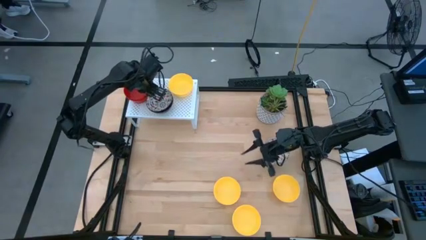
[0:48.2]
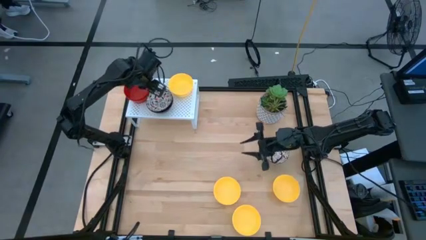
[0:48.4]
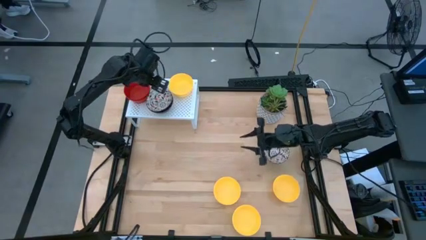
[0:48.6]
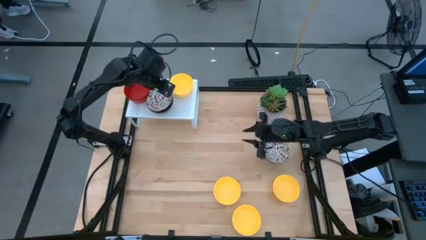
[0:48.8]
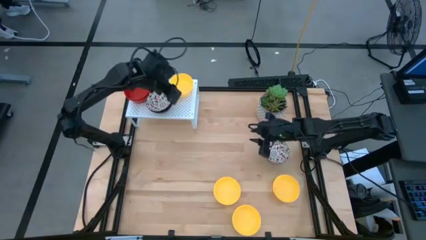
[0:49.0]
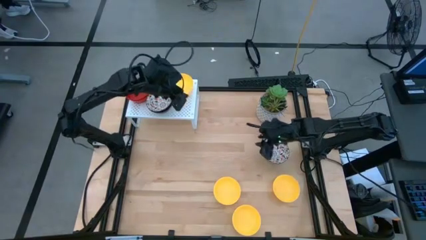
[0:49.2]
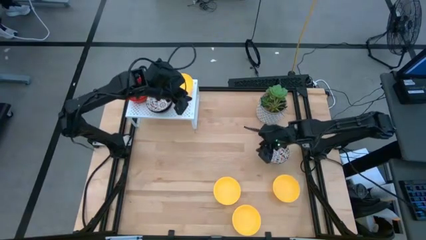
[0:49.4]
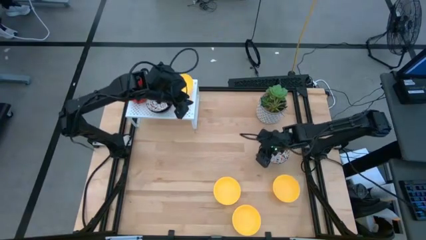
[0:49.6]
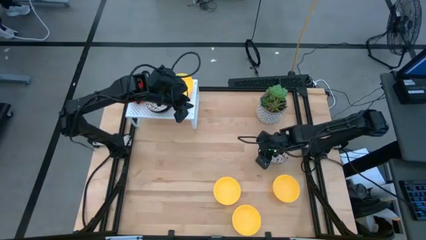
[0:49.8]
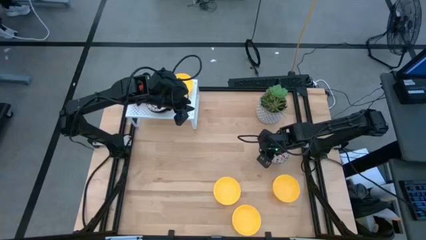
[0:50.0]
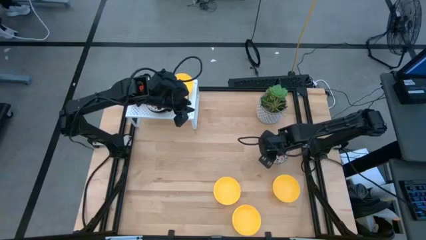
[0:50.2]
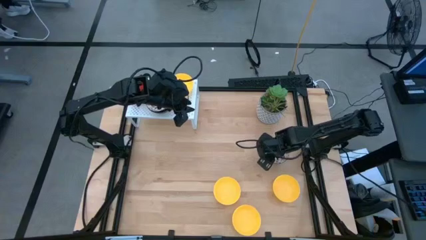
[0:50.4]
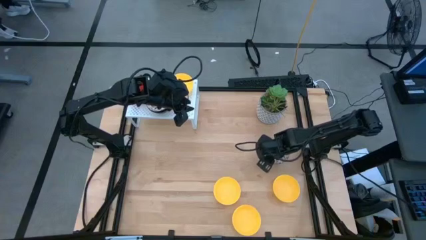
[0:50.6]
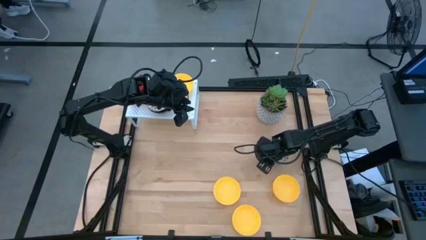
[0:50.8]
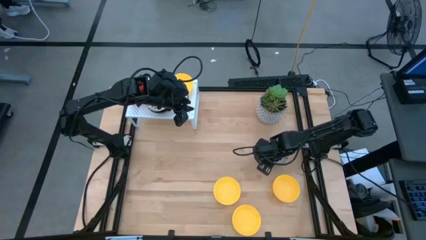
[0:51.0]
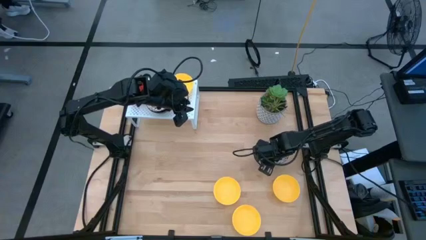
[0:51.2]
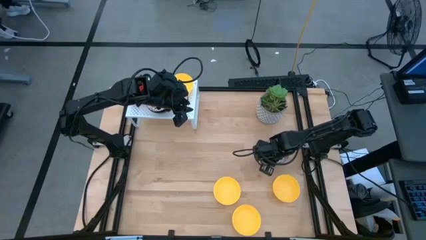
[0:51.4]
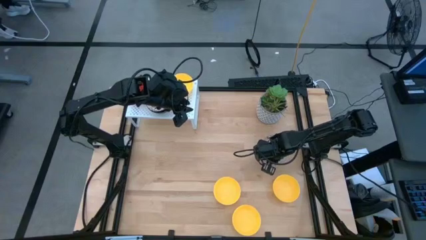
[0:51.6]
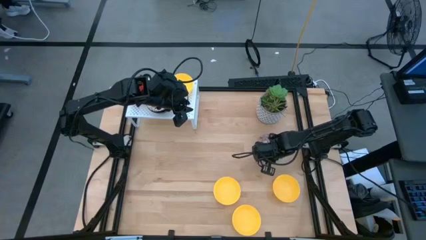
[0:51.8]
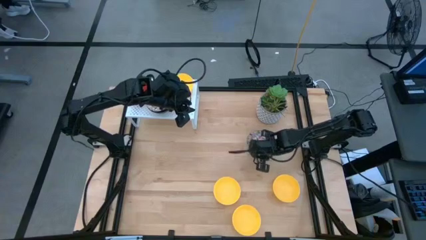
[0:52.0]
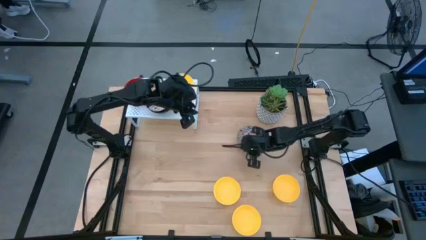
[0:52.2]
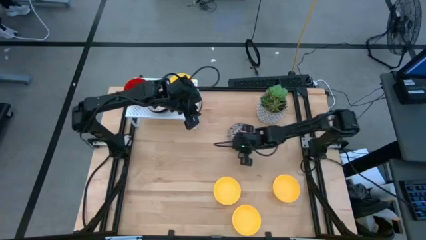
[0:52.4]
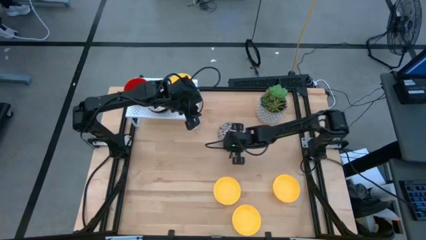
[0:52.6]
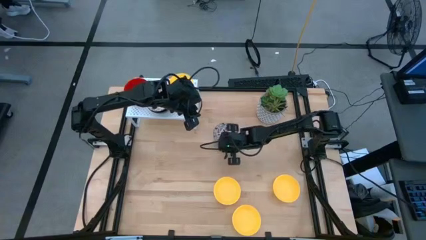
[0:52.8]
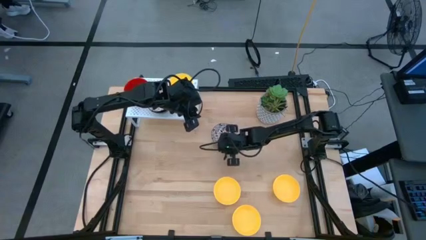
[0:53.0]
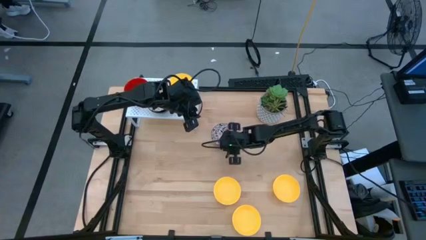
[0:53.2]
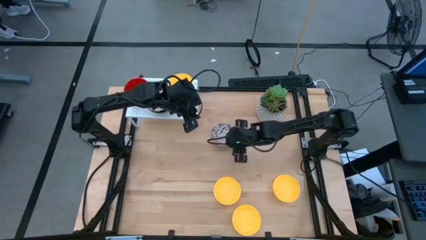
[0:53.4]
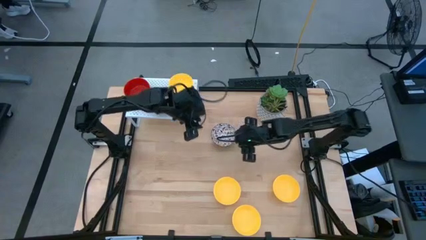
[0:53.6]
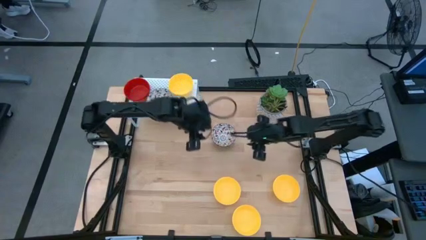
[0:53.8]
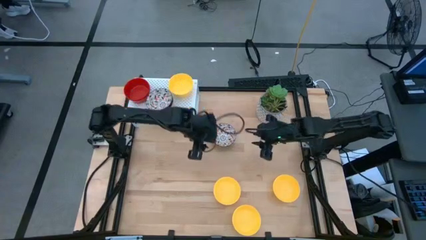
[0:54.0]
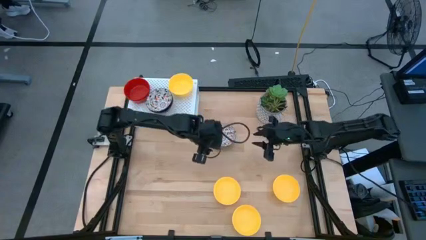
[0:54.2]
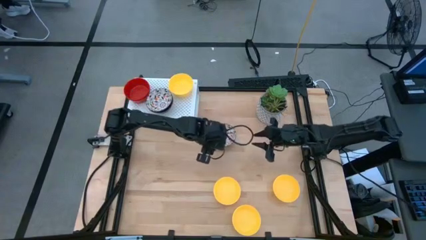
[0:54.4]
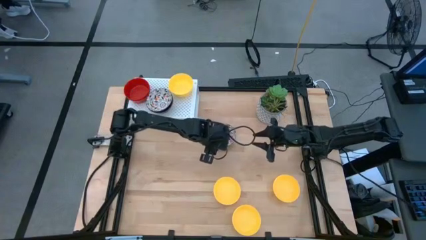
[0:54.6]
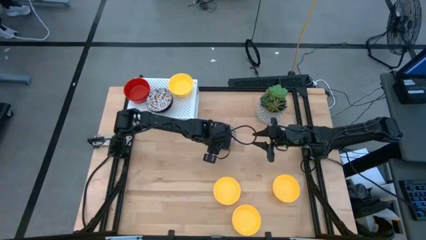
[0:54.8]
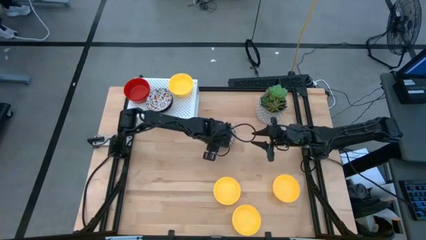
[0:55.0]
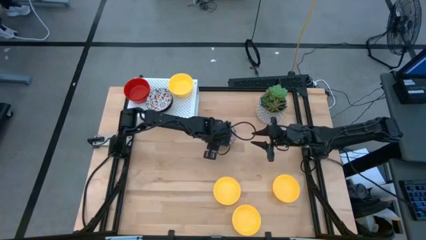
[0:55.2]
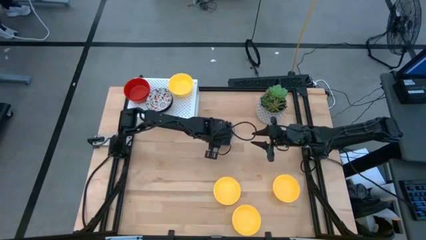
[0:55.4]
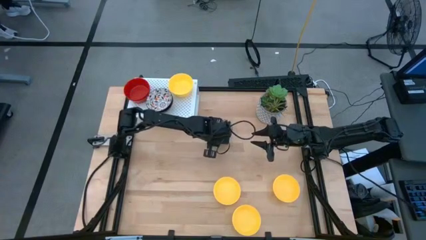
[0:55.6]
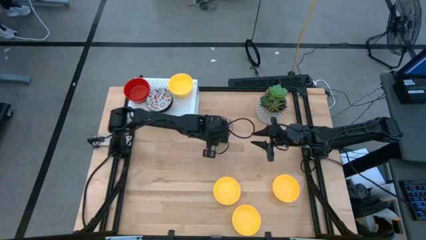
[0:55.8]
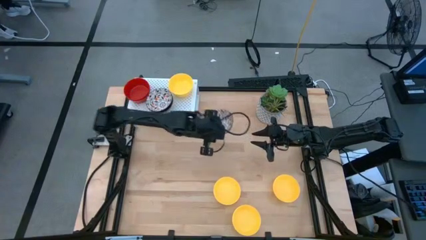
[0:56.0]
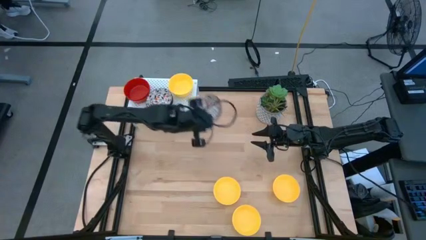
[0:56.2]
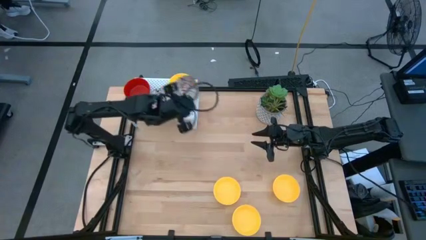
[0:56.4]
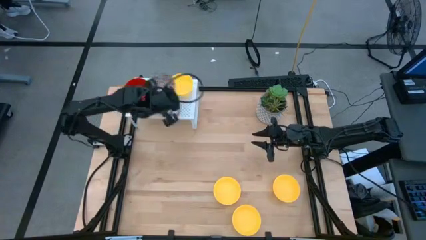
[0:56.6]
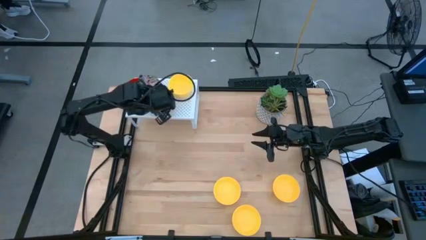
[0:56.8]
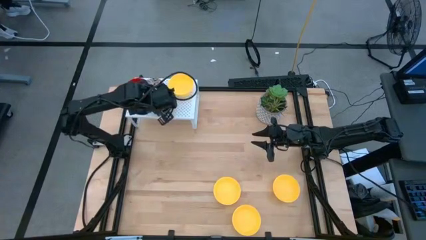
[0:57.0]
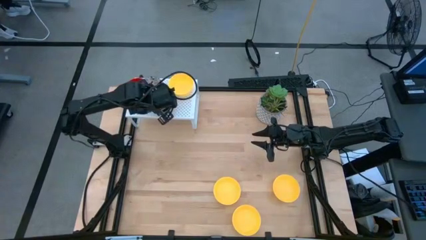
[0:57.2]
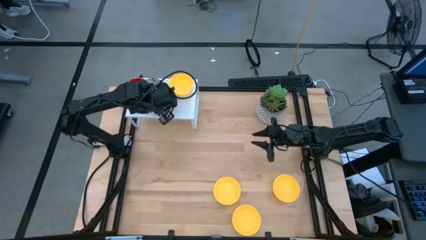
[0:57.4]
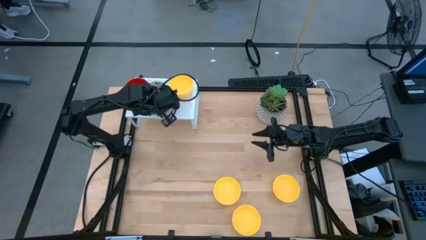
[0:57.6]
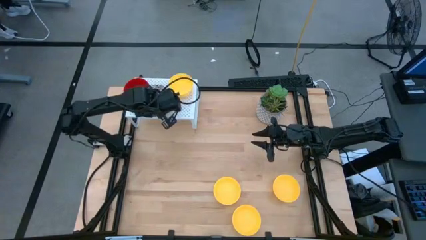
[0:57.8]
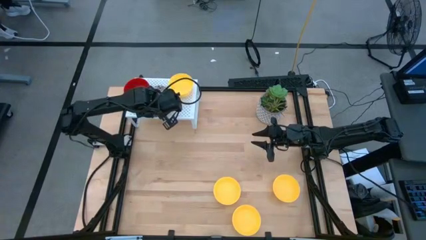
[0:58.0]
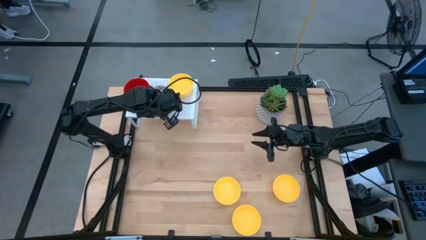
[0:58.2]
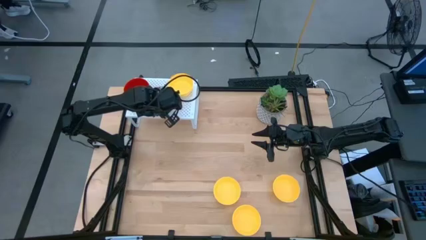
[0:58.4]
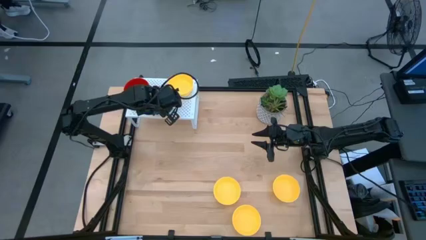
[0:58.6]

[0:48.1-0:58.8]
Task: Pick & Place Mini bowls
Stack the black bowl on top of the black bowl on the shelf
